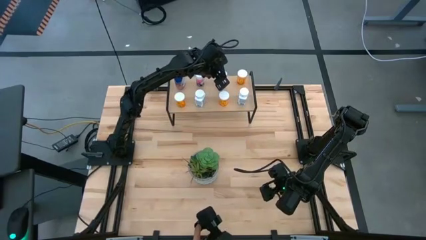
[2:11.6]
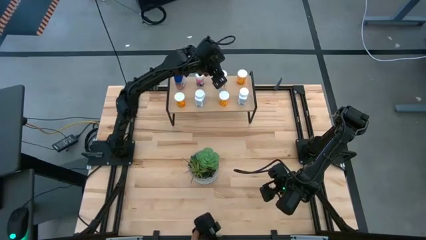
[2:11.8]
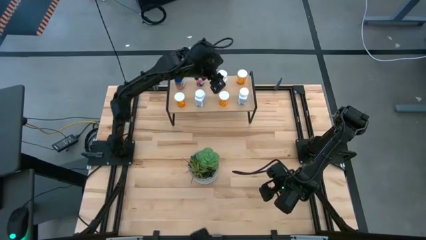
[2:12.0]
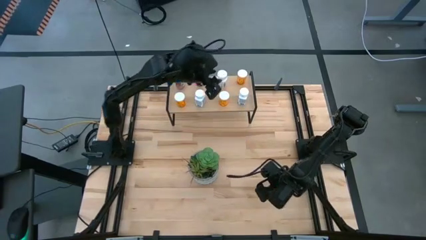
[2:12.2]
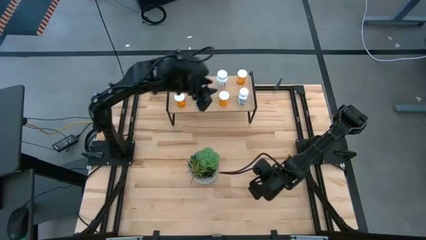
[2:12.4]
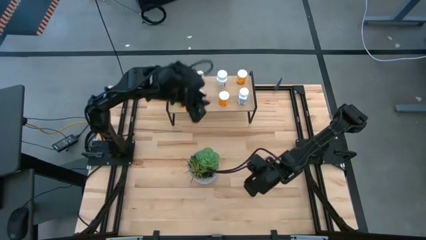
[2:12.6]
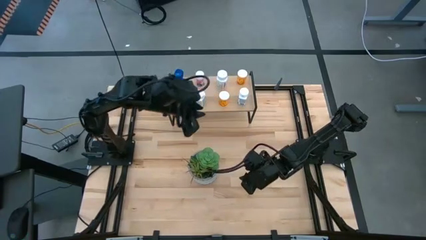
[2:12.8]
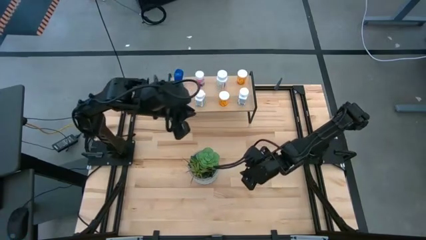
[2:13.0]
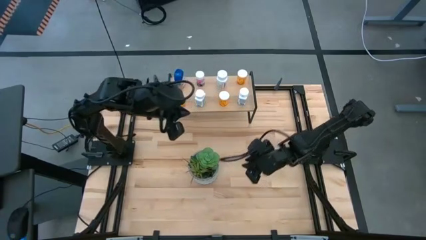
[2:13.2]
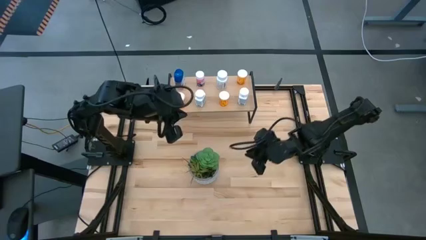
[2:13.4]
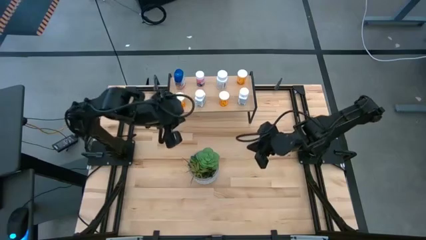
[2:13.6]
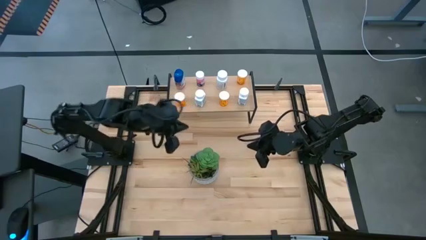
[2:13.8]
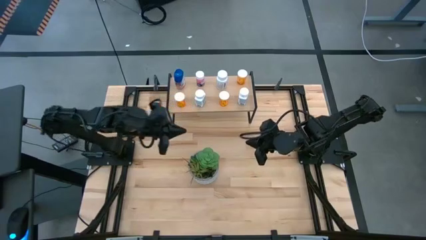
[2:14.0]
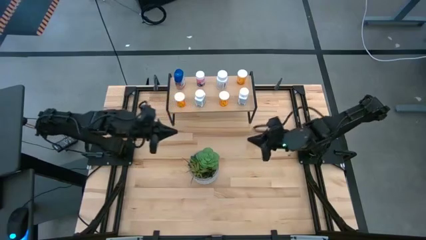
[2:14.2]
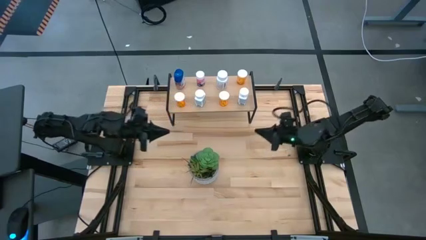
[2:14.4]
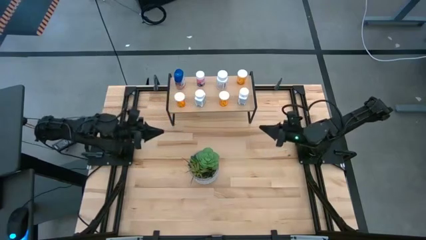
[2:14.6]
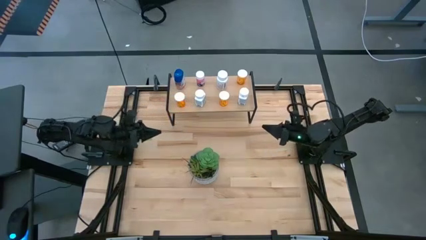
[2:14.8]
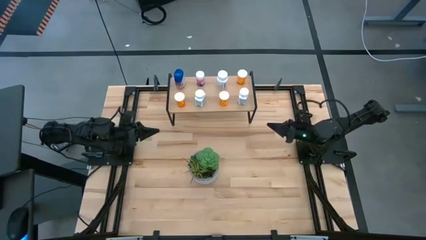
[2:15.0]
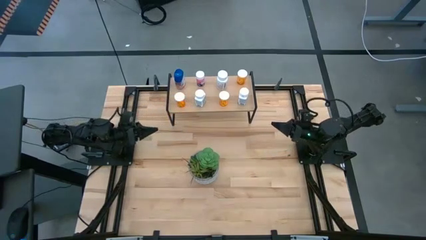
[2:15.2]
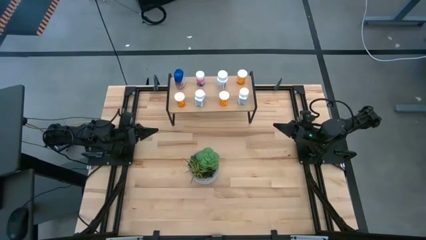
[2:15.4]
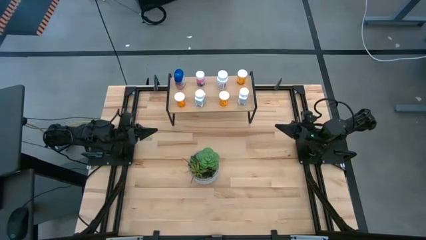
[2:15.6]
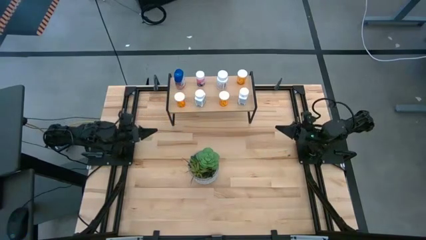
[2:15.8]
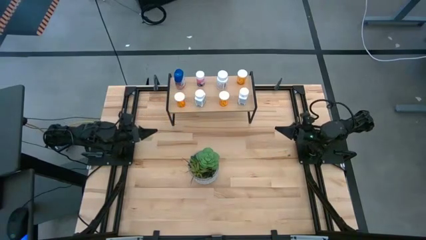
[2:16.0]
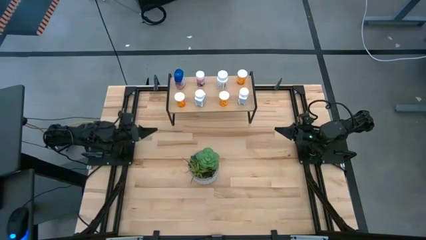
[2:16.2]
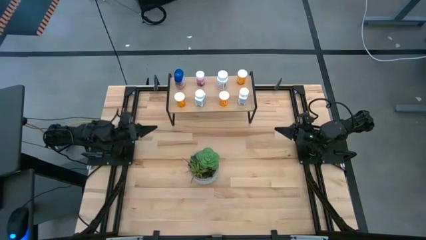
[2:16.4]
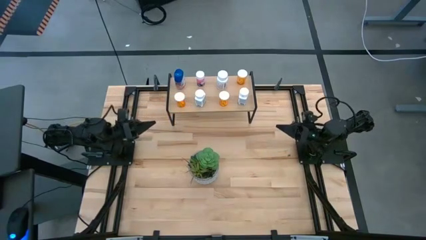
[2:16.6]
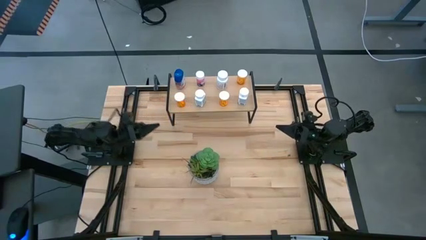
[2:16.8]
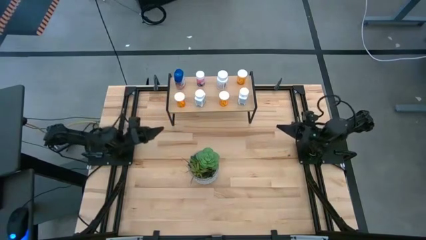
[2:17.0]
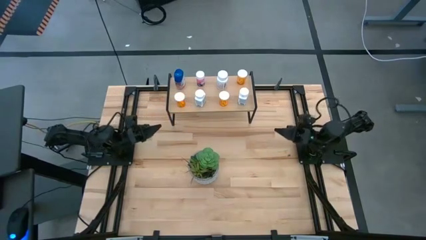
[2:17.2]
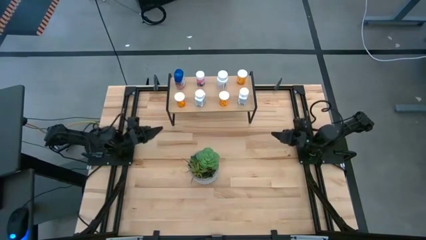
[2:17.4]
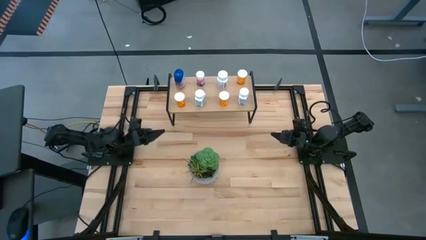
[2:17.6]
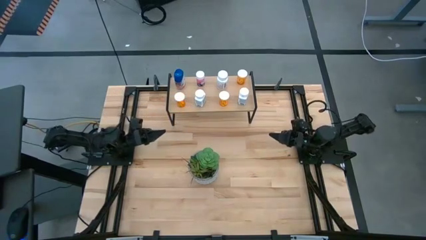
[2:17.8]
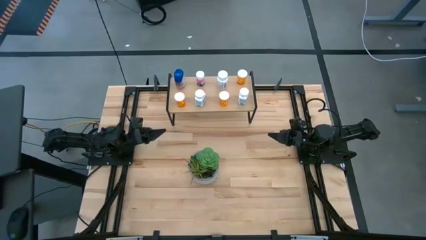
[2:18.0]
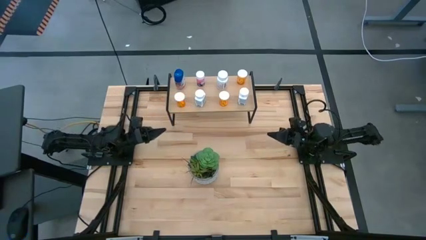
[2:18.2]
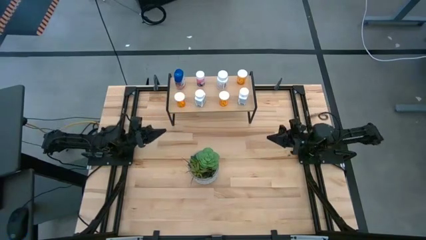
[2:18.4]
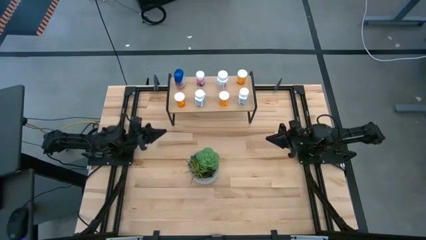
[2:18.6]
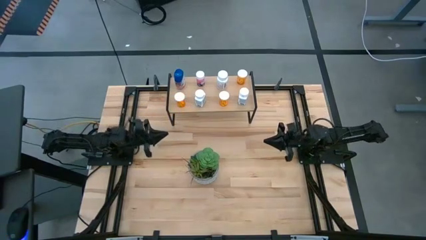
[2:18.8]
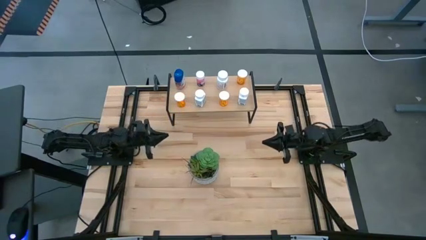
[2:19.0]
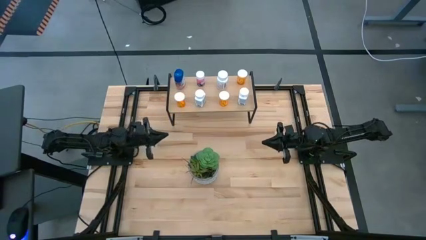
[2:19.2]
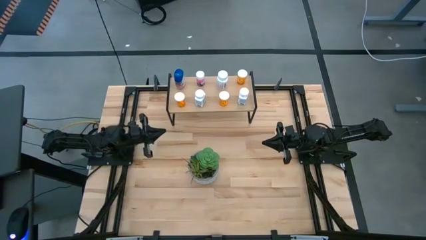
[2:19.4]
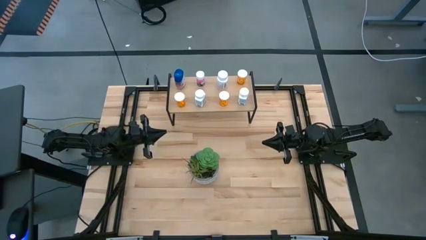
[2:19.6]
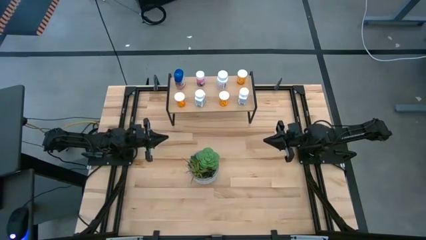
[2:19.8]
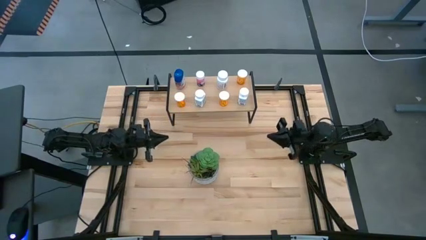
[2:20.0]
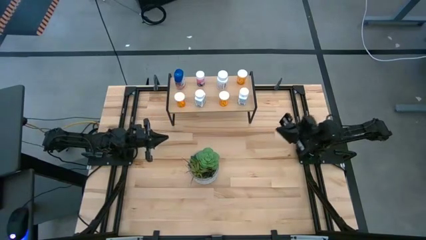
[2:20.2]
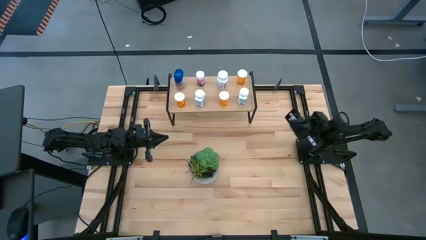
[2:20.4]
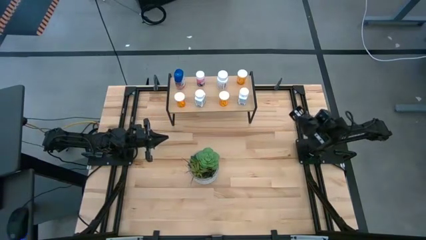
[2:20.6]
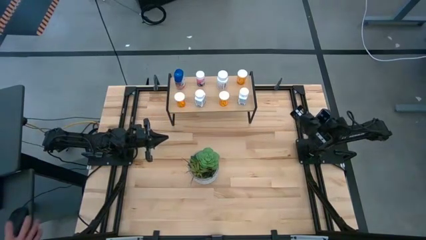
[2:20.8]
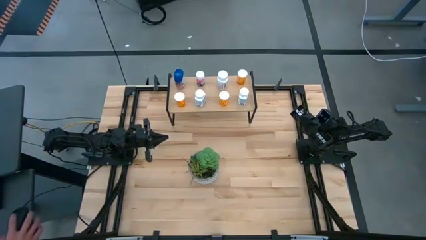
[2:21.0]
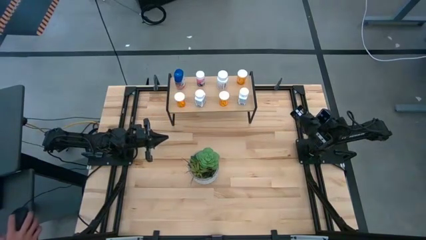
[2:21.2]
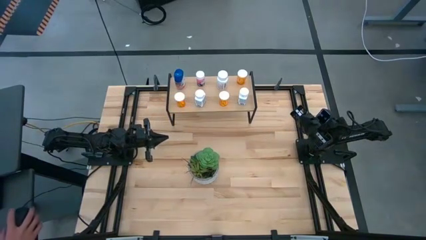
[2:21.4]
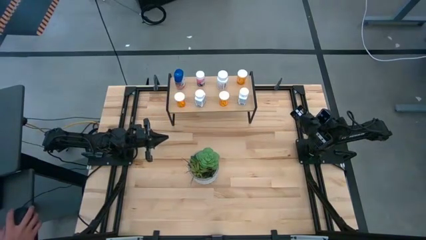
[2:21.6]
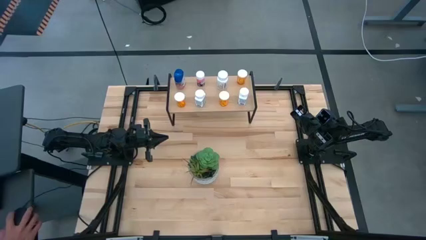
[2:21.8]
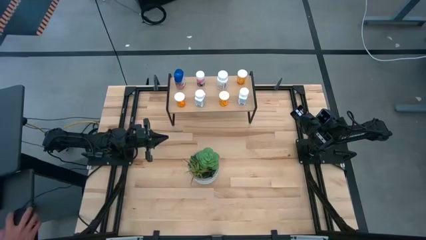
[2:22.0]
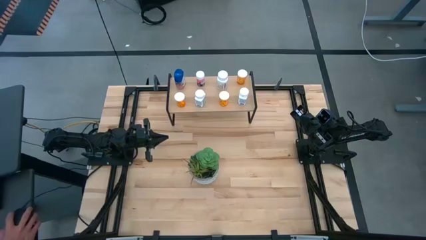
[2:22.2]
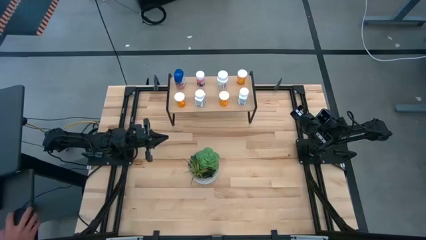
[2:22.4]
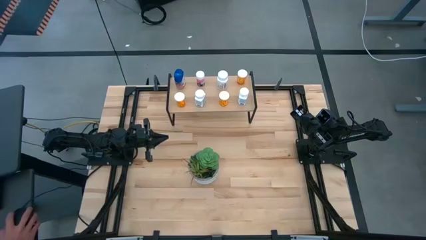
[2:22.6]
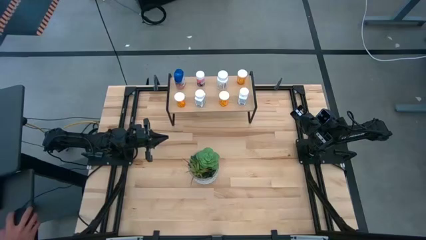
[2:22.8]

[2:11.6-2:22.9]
Task: Pick and place medicine bottles onto shelf by color
Return to Home Position
